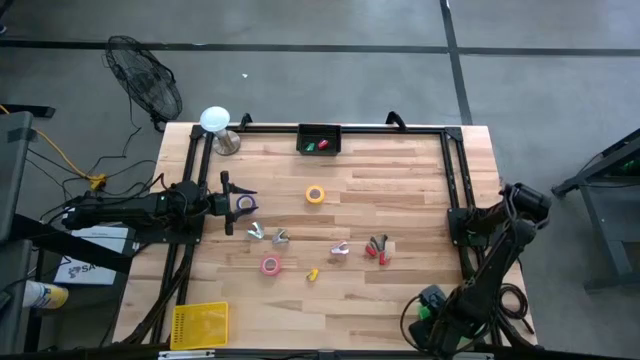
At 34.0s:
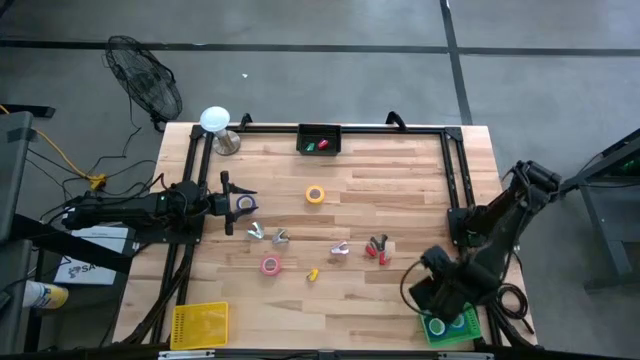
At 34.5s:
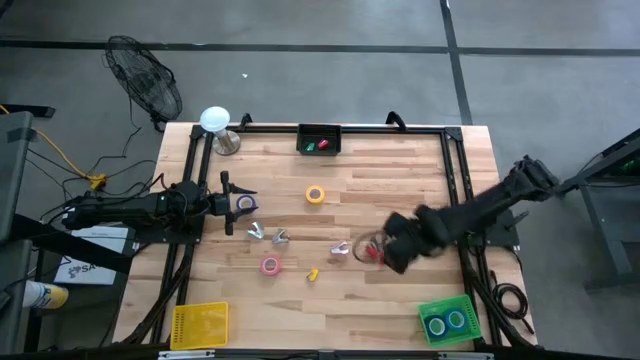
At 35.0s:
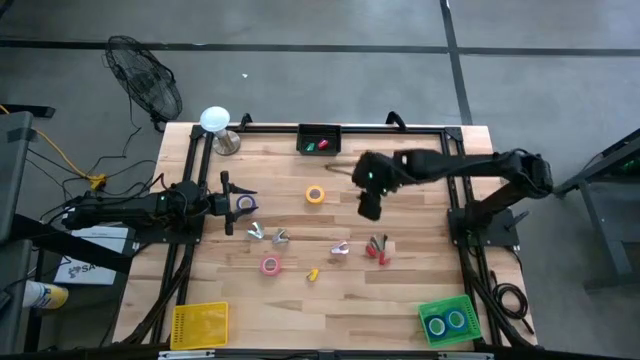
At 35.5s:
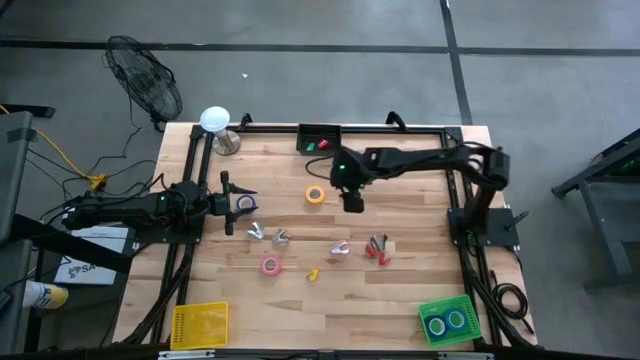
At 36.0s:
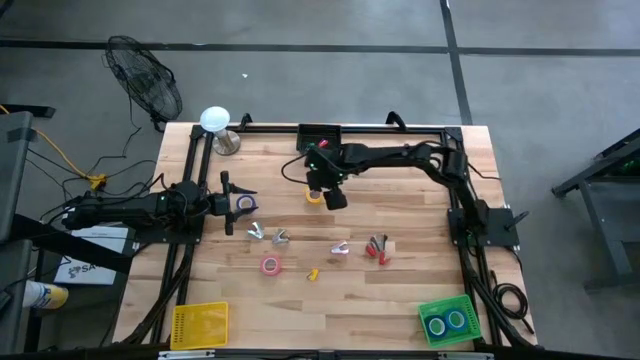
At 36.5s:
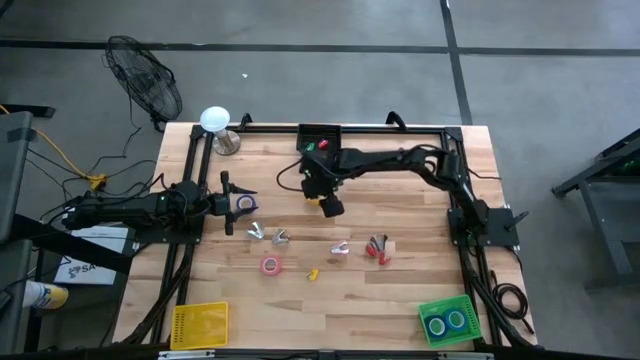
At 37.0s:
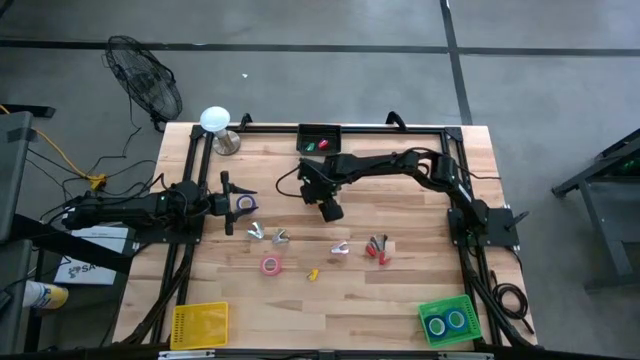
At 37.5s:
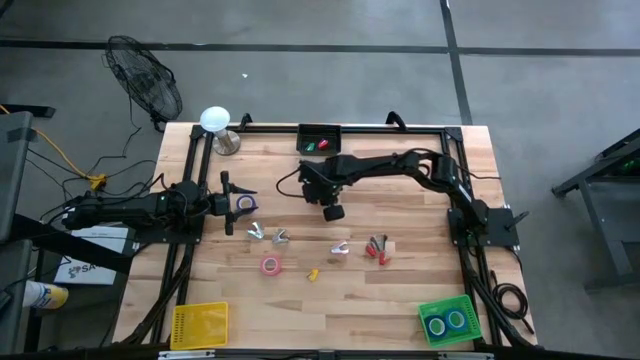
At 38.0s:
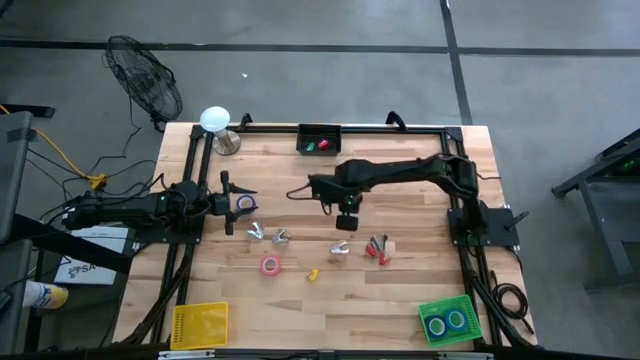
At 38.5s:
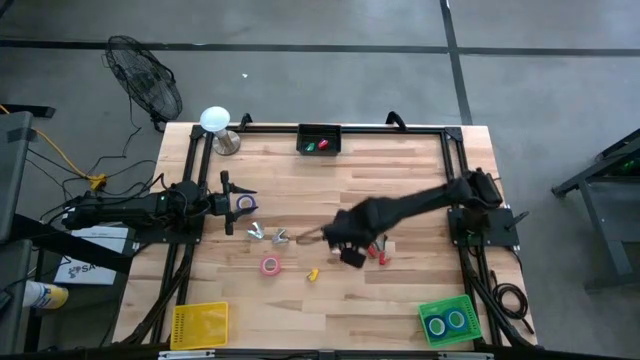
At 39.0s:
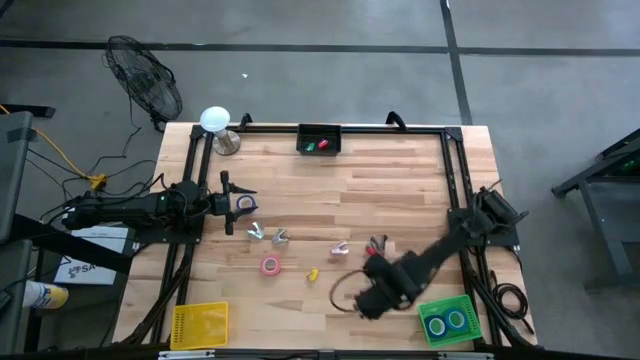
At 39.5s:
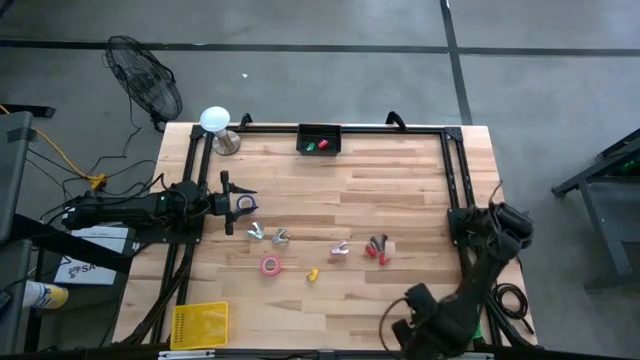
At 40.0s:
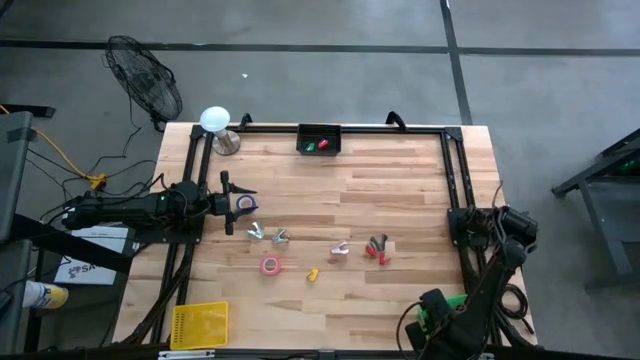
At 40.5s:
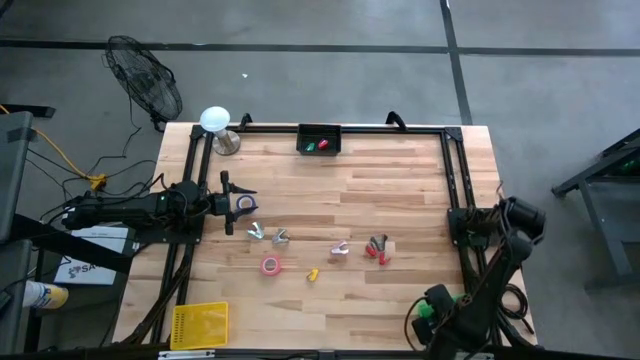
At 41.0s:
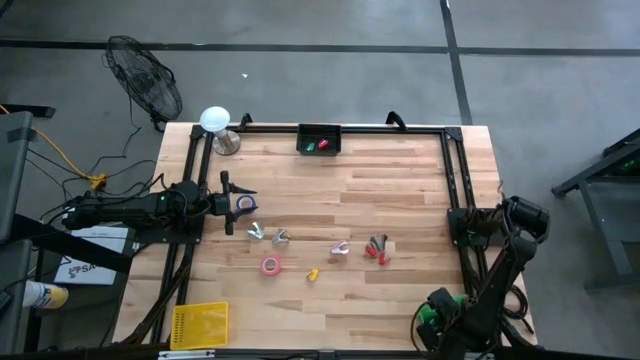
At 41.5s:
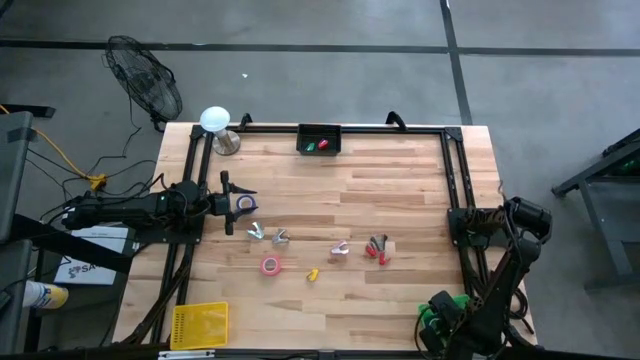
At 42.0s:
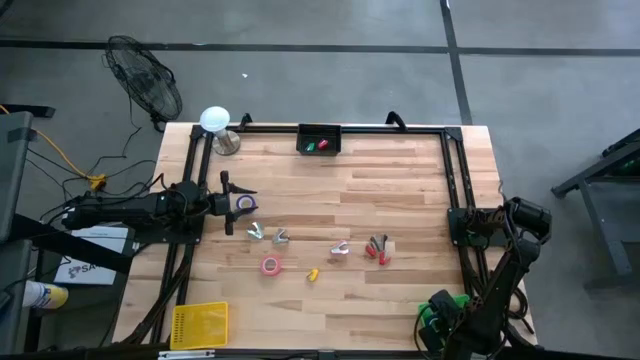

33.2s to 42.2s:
Task: Pick and place Stapler, Stapler remover, tape
Put the yellow tape into the green bin

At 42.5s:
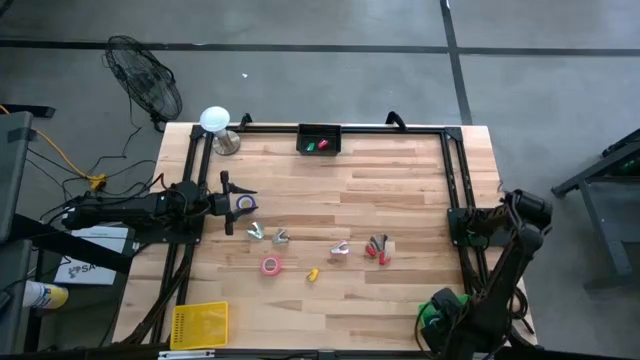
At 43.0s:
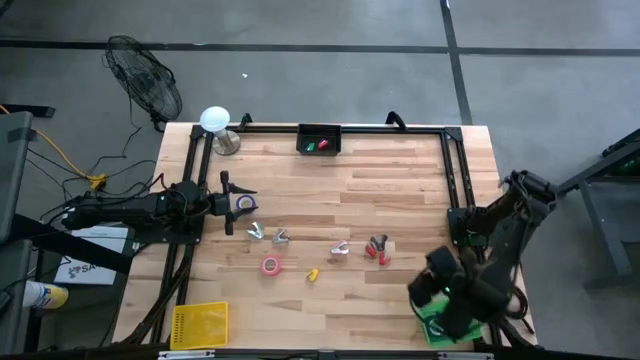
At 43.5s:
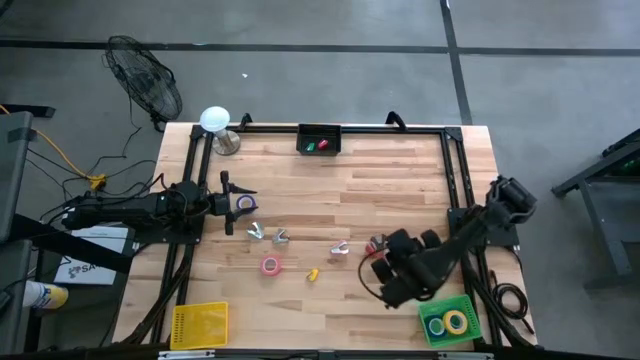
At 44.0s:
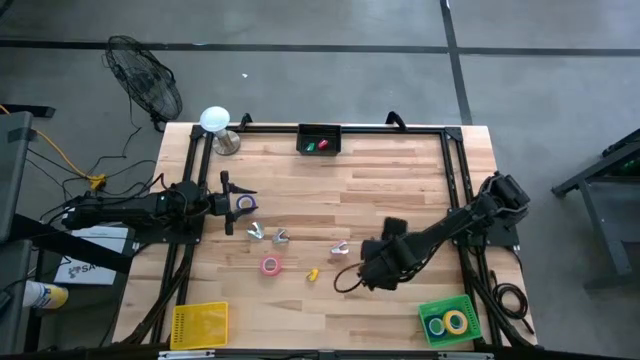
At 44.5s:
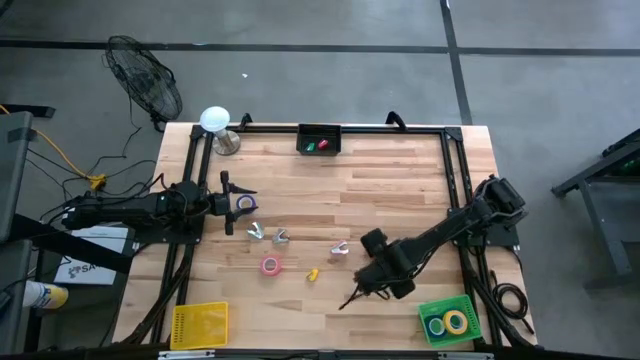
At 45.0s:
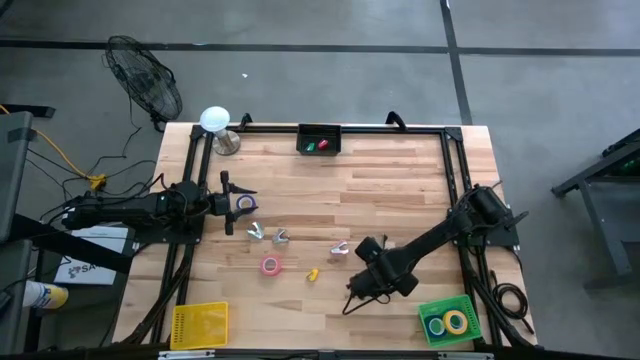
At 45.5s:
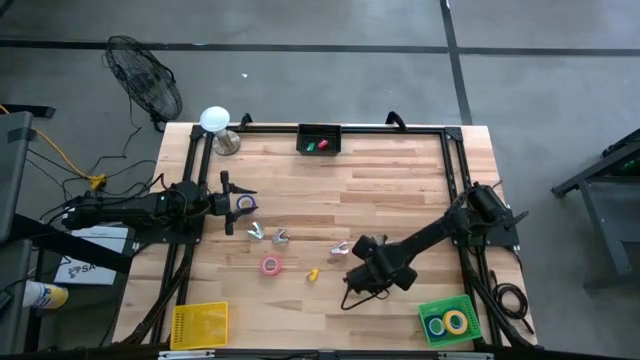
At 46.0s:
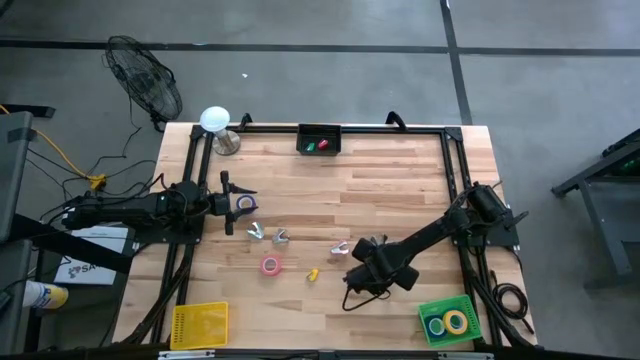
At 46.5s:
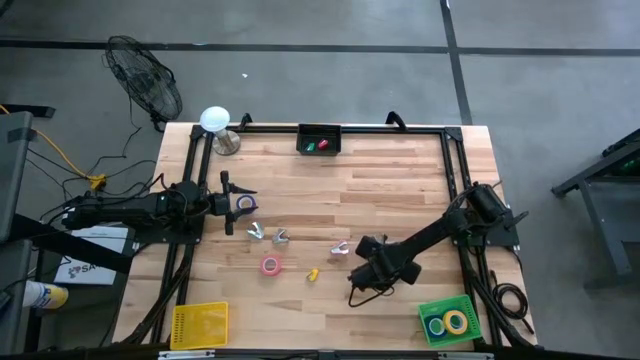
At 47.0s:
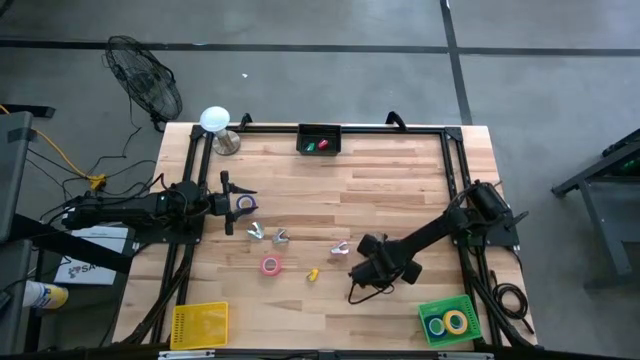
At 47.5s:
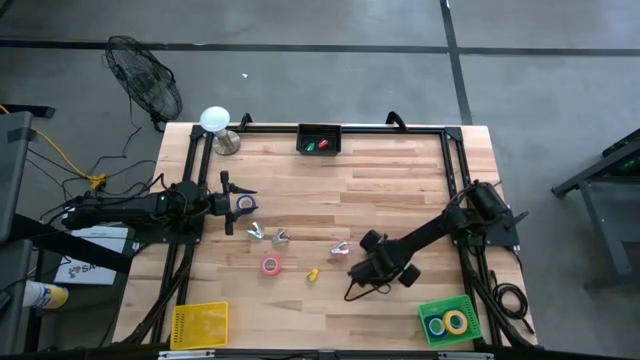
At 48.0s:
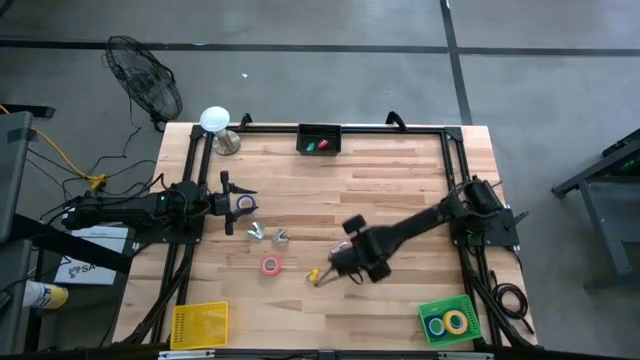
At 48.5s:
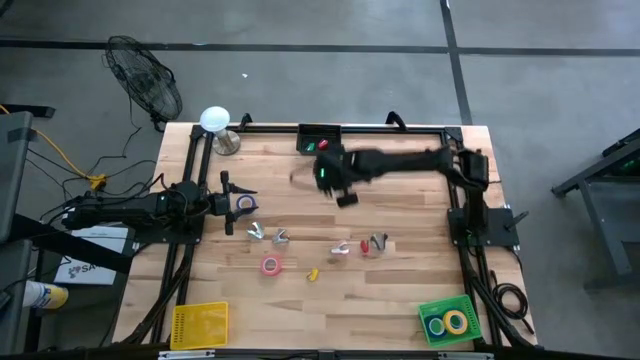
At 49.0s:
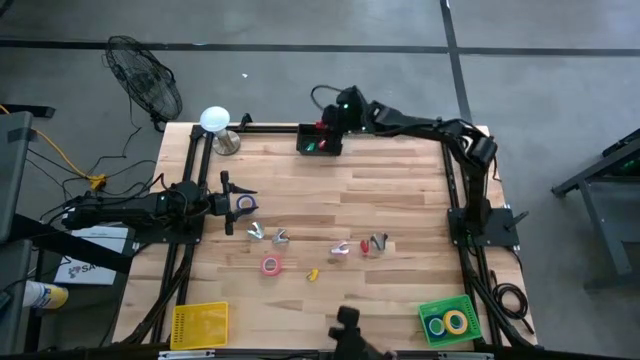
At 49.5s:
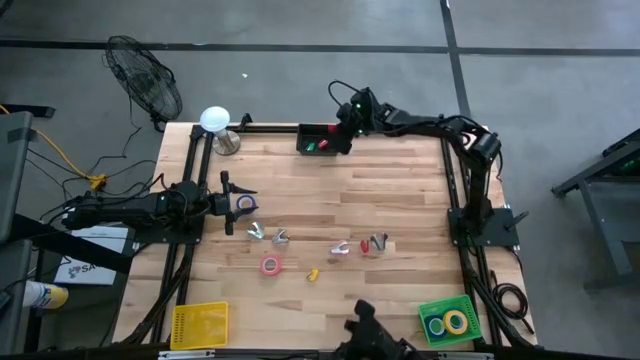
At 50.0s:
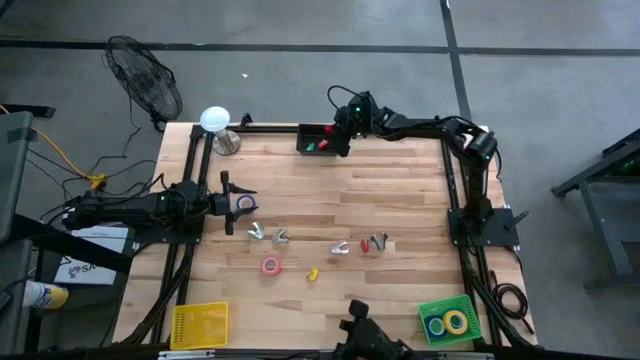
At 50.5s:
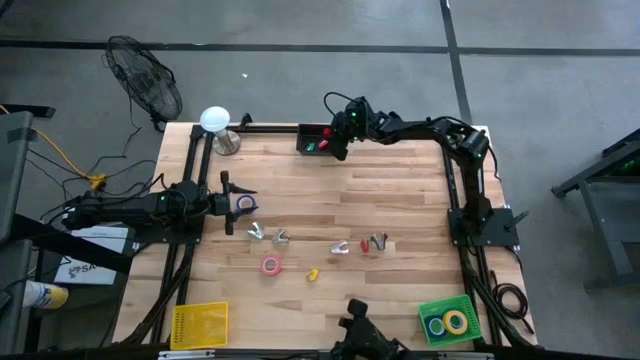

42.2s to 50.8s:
Put the right red stapler into the black bin

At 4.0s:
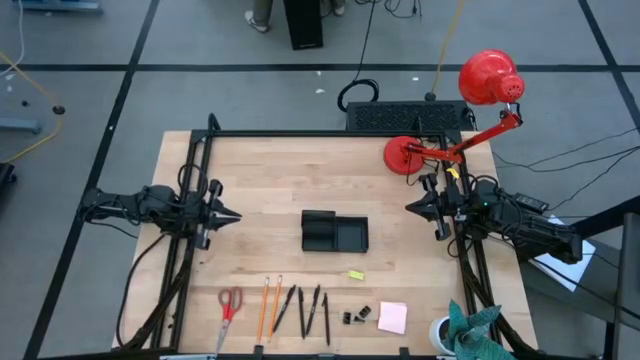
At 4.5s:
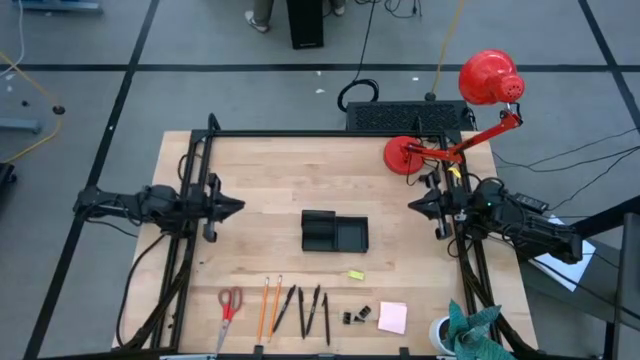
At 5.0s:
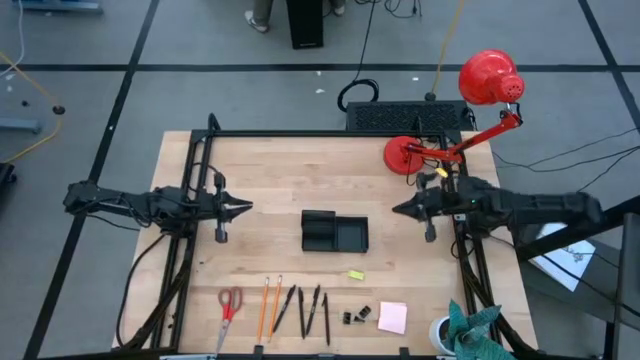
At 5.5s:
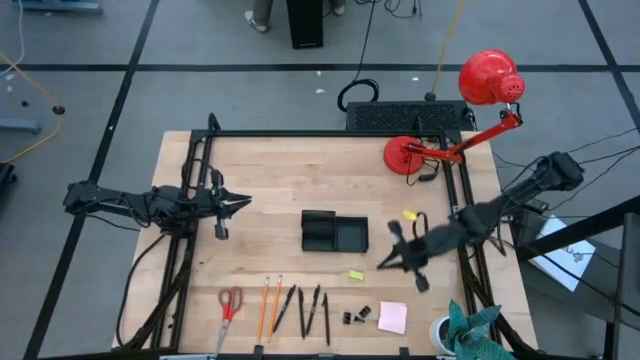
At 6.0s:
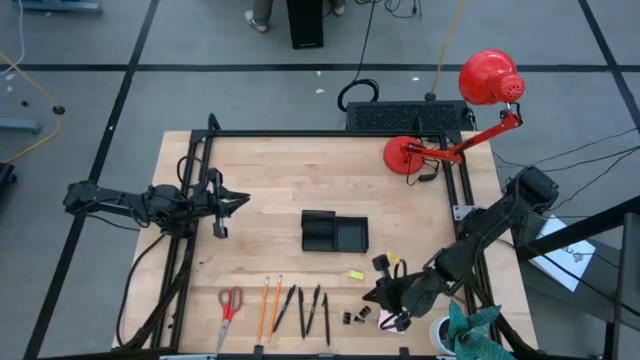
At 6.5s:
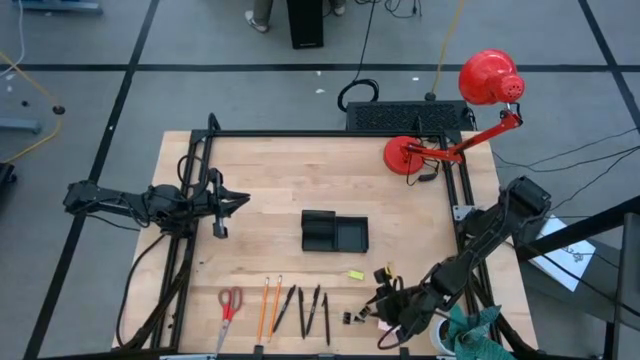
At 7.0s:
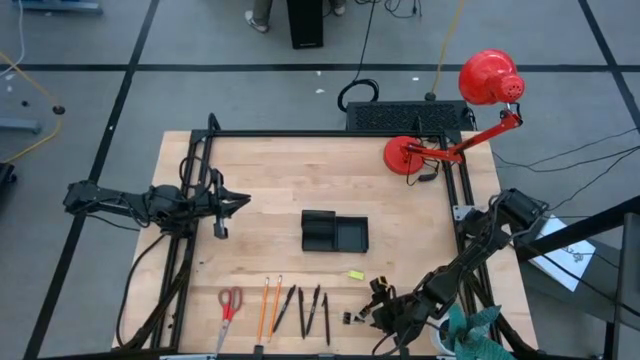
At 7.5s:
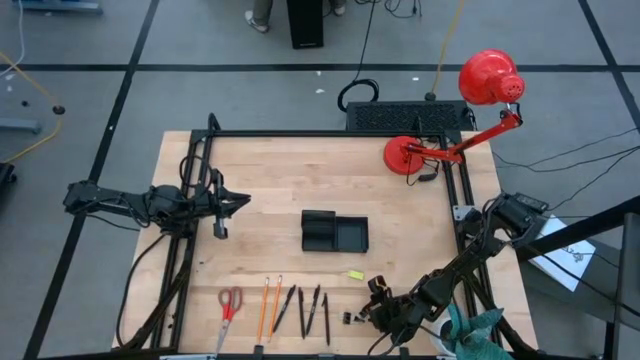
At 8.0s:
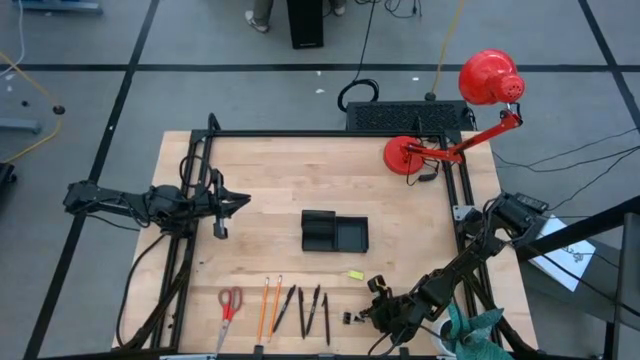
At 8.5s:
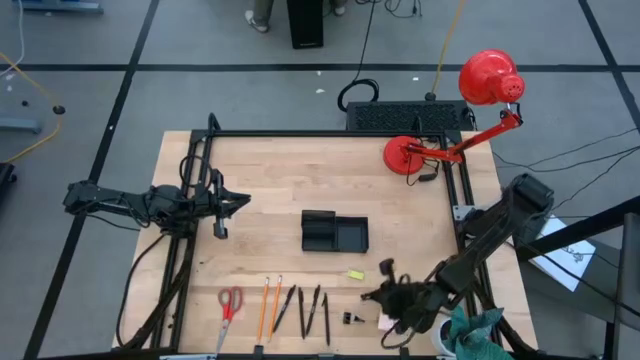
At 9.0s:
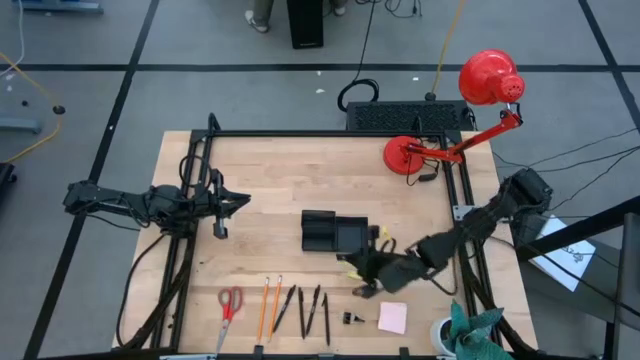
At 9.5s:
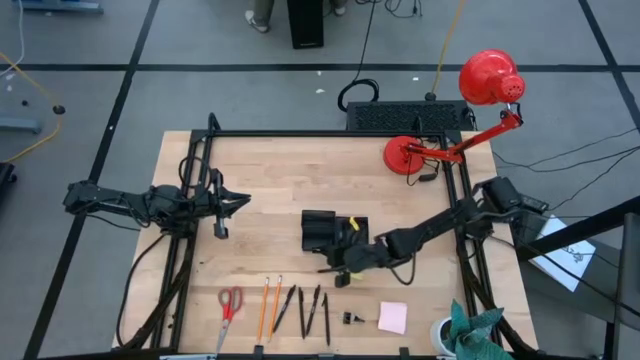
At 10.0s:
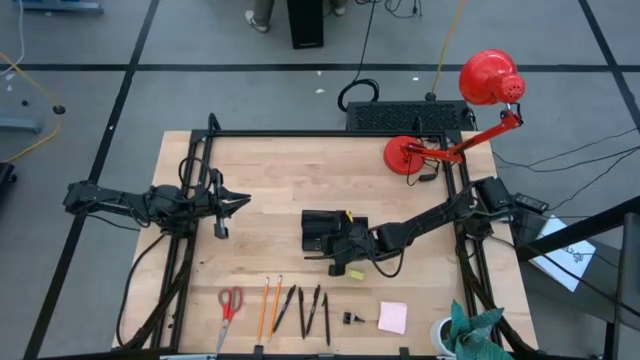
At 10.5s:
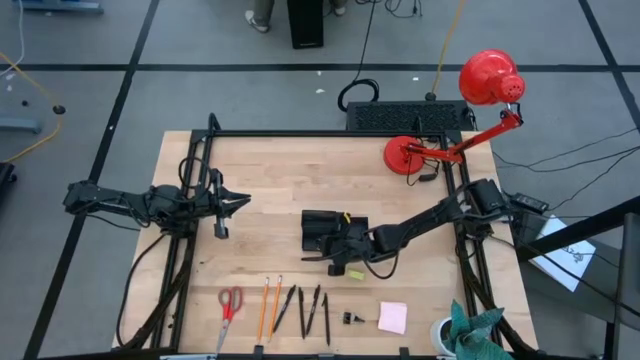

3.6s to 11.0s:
Task: Pick and place office supplies into organizer
Put the top black binder clip into the desk organizer
